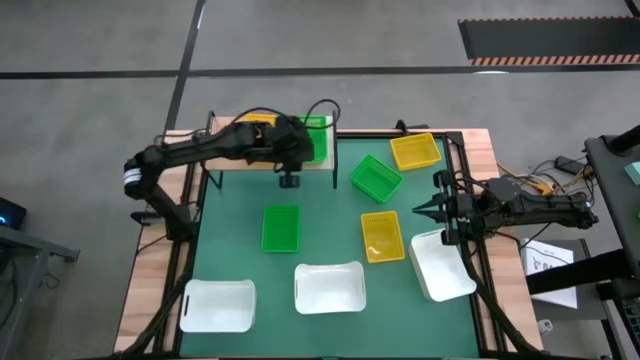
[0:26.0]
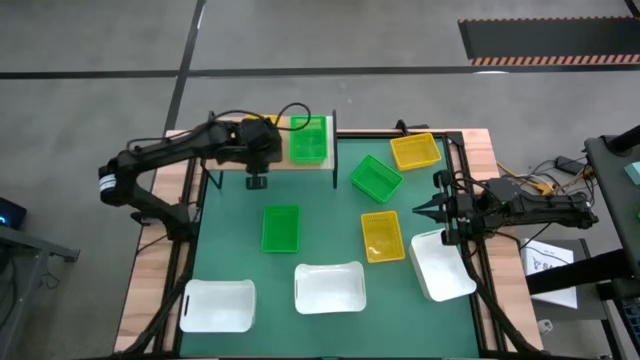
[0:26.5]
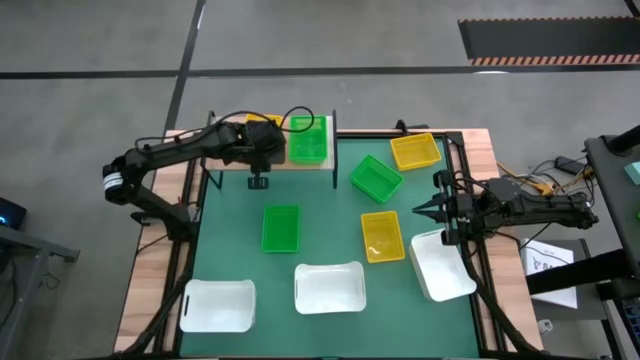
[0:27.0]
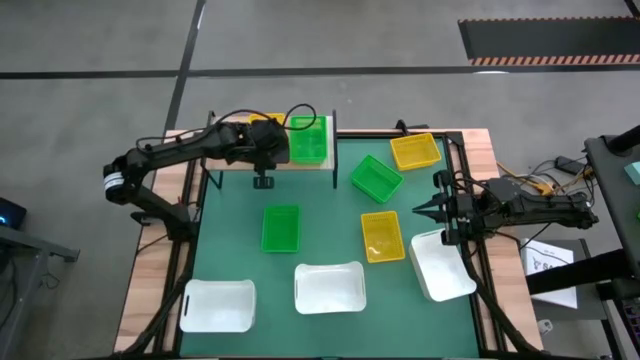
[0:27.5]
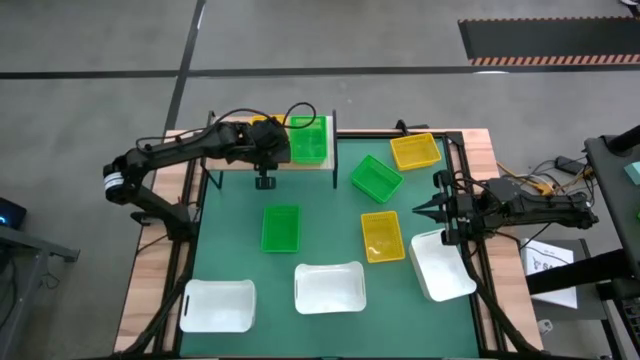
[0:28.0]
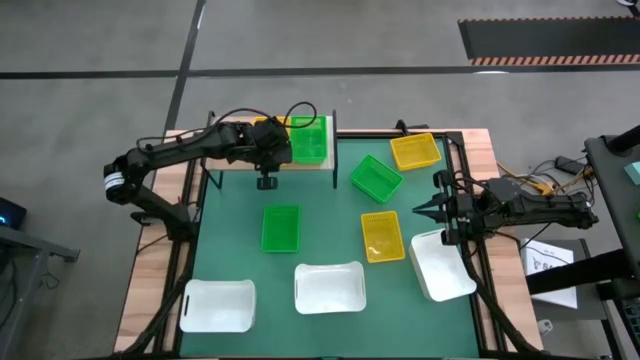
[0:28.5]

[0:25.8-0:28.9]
Adjust the yellow basket on the shelf

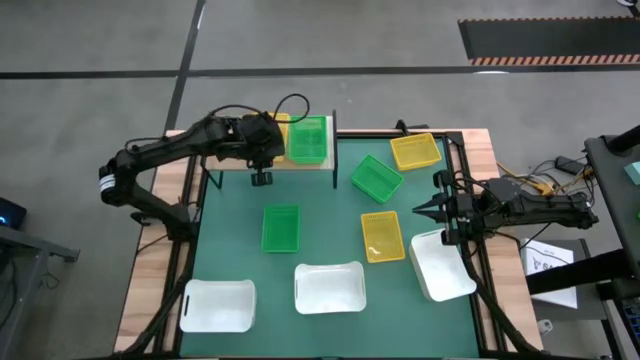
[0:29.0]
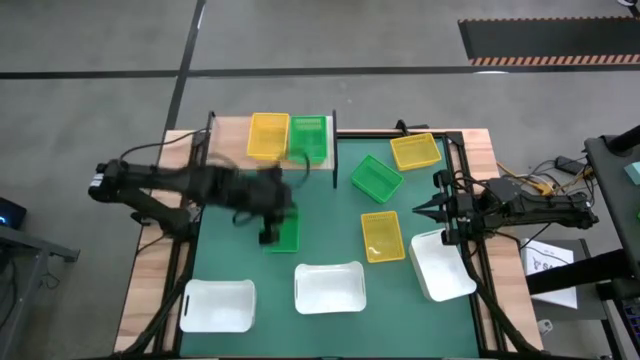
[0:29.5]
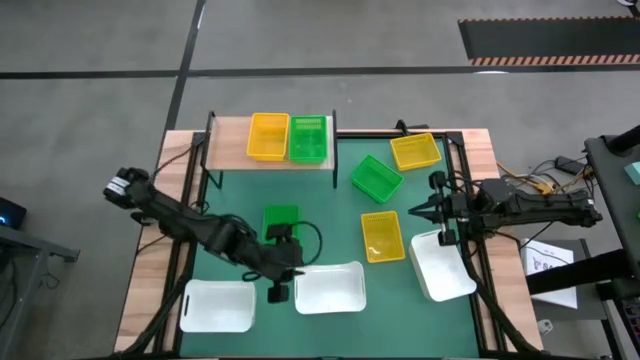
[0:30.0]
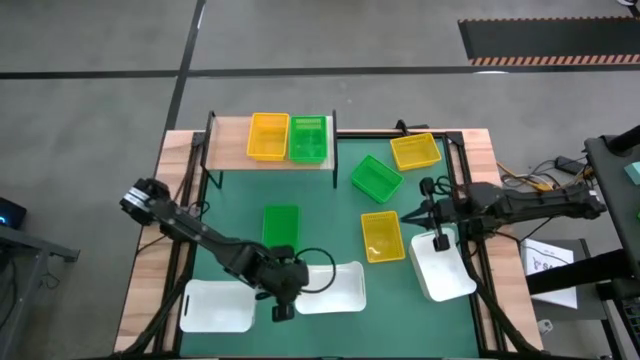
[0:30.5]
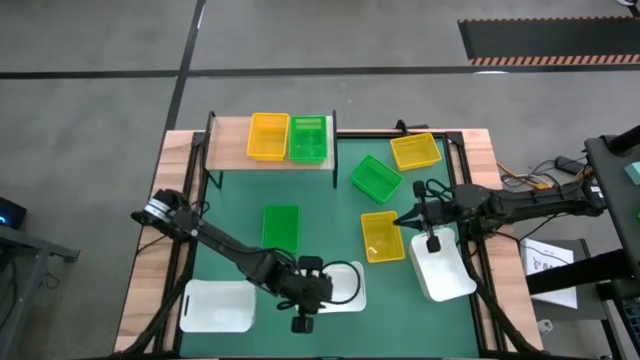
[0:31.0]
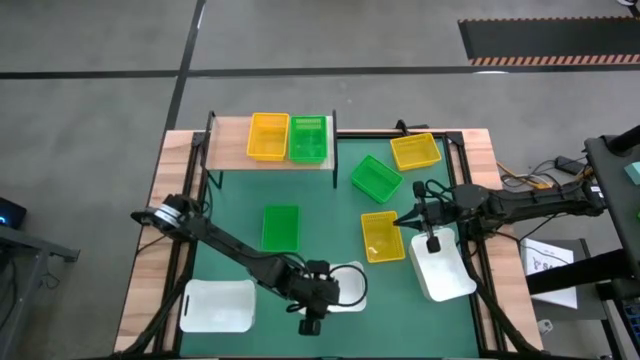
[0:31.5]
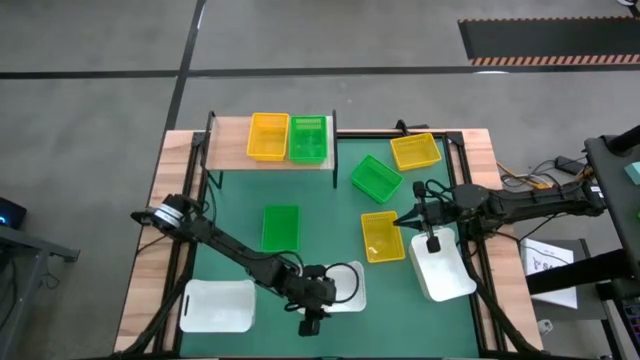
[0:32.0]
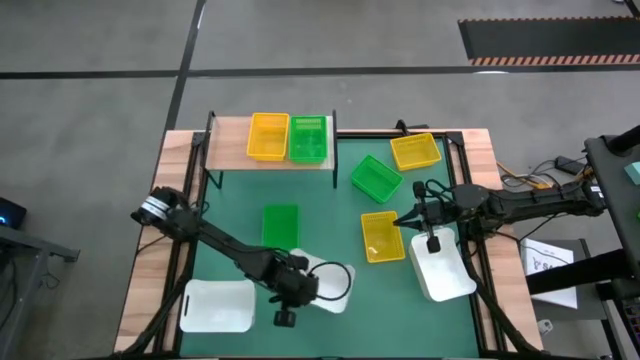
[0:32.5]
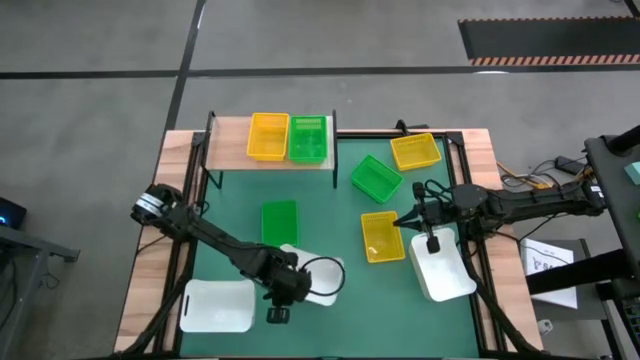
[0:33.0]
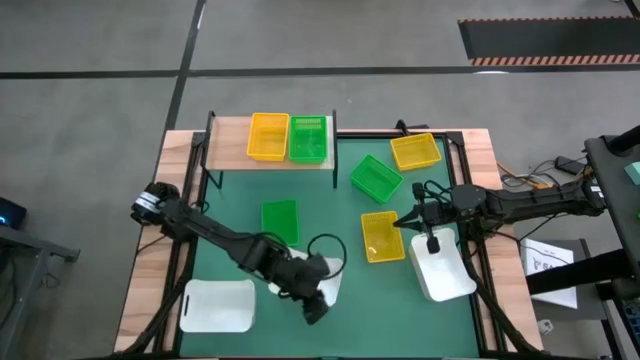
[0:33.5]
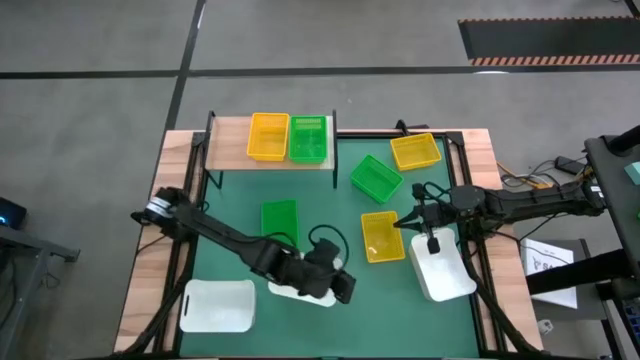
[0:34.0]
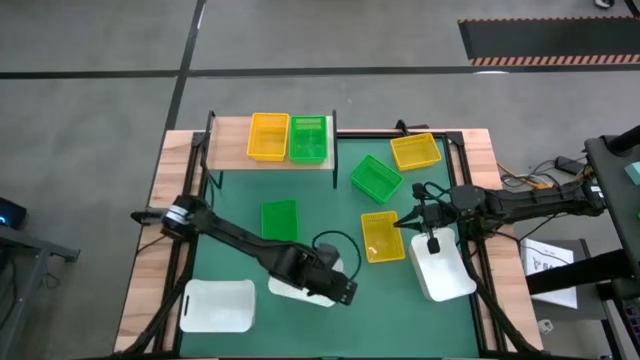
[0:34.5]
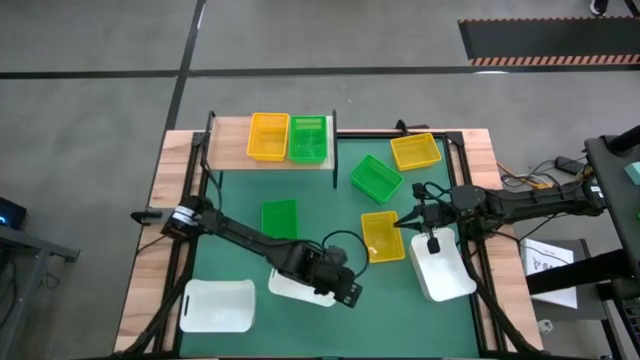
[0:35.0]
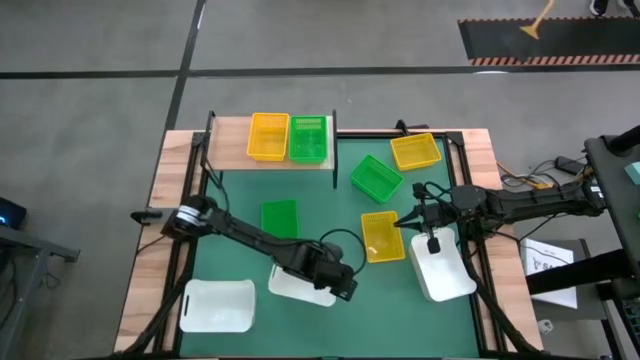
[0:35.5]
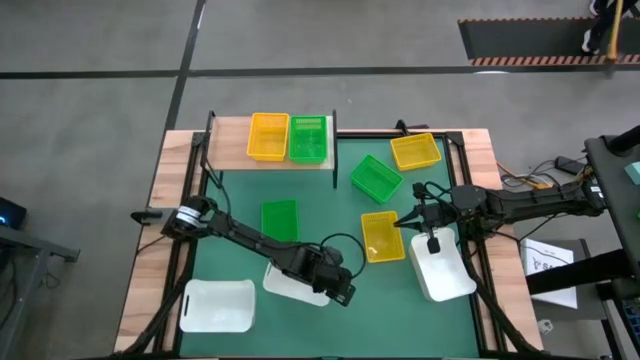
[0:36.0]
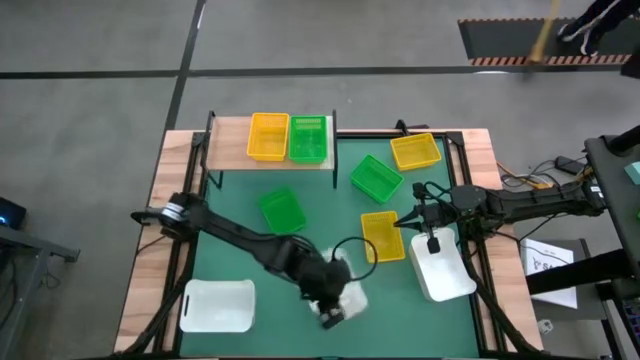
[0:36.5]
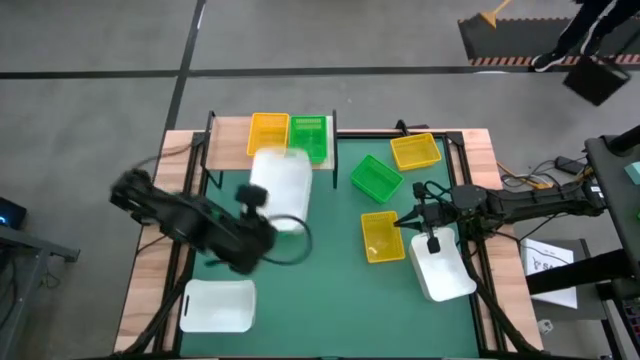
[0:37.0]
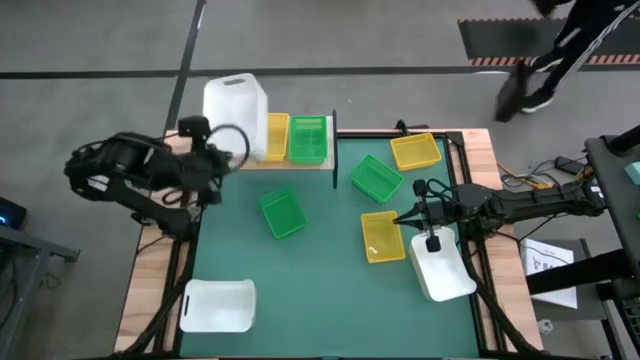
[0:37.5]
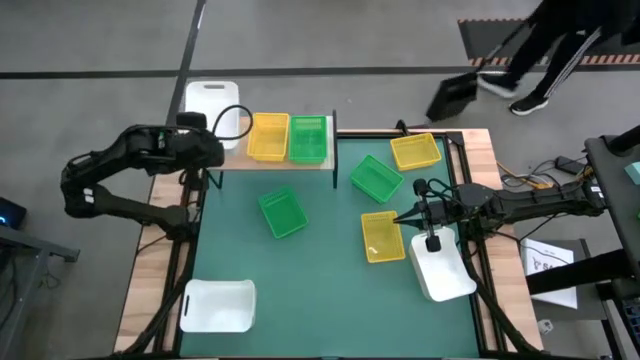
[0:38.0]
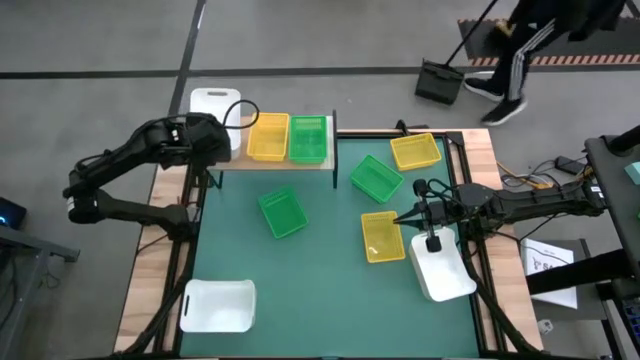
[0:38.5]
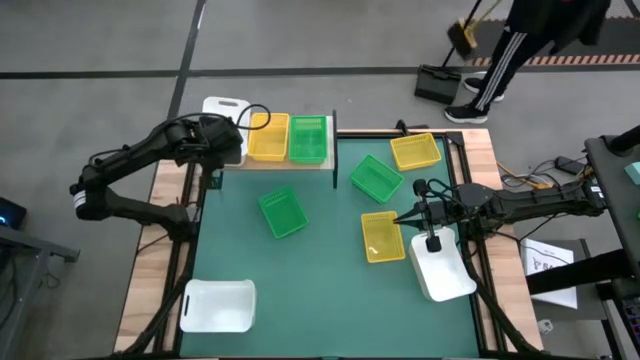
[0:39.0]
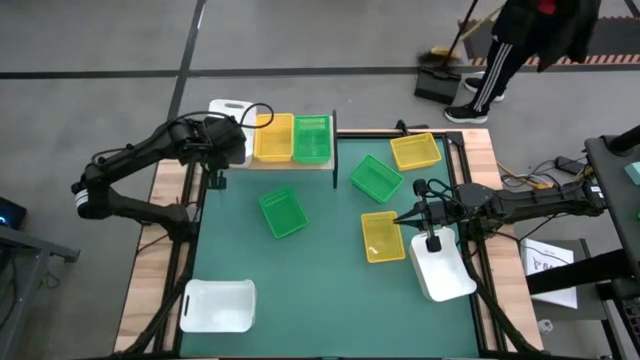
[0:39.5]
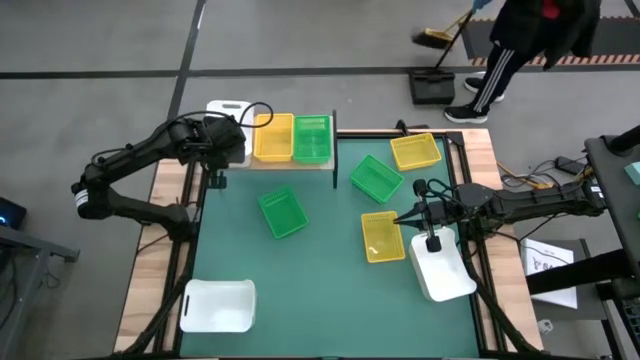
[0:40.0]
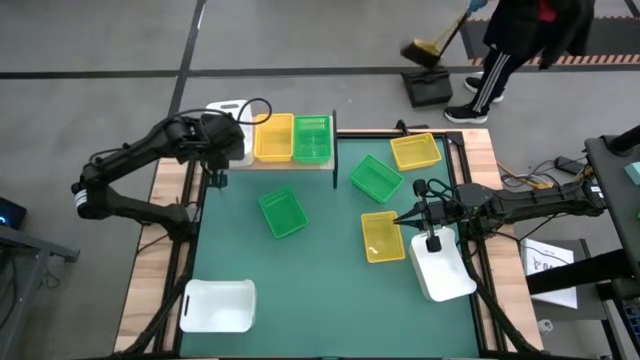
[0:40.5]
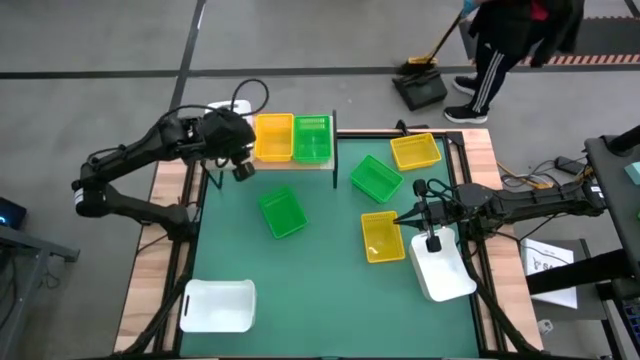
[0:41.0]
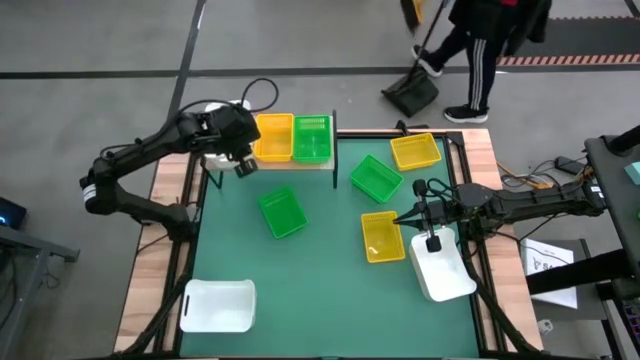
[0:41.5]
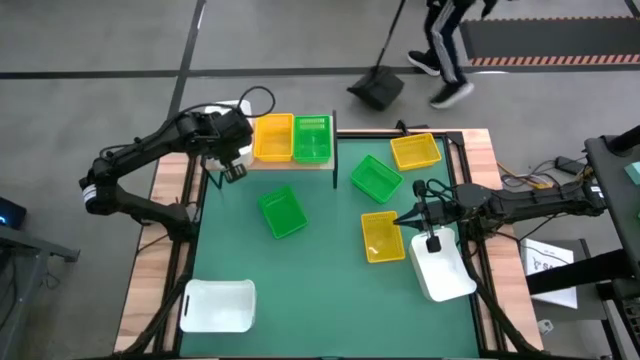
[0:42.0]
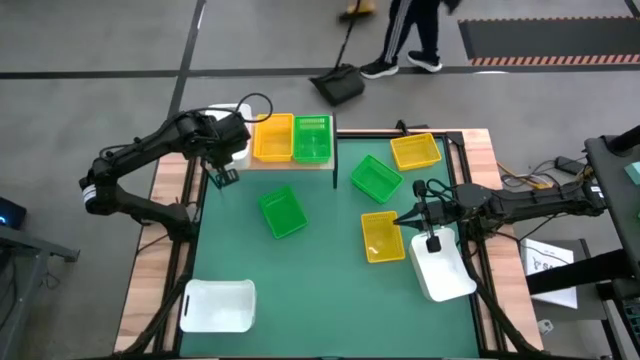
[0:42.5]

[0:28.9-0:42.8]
Put the middle white bin on the shelf
